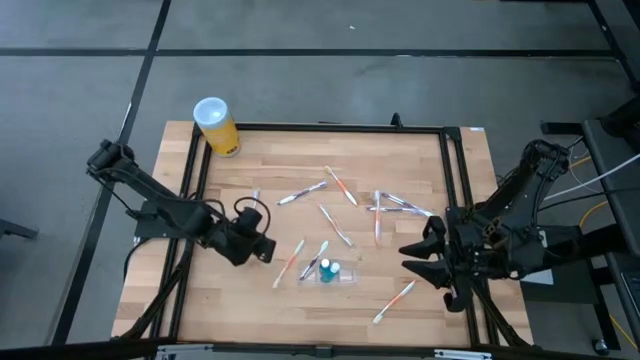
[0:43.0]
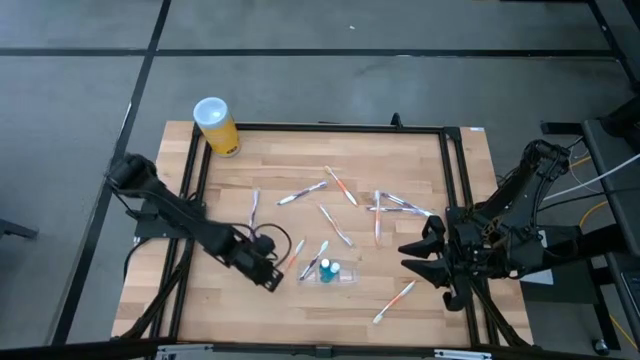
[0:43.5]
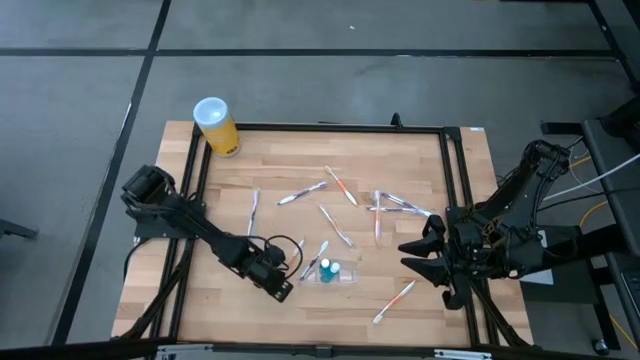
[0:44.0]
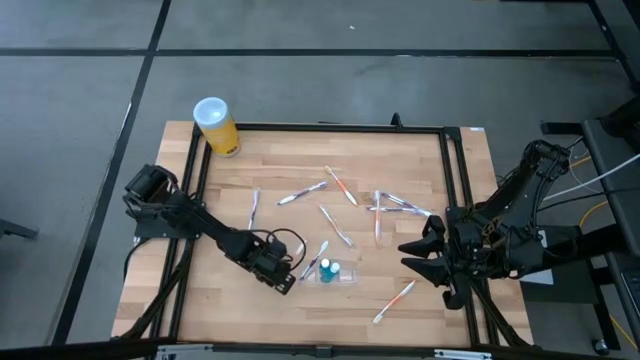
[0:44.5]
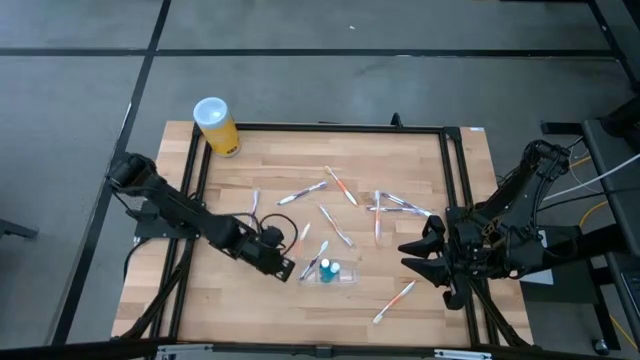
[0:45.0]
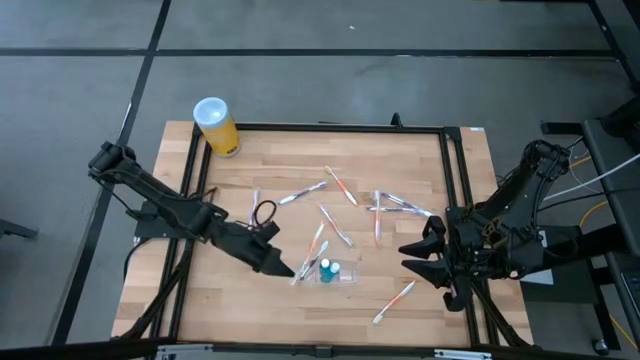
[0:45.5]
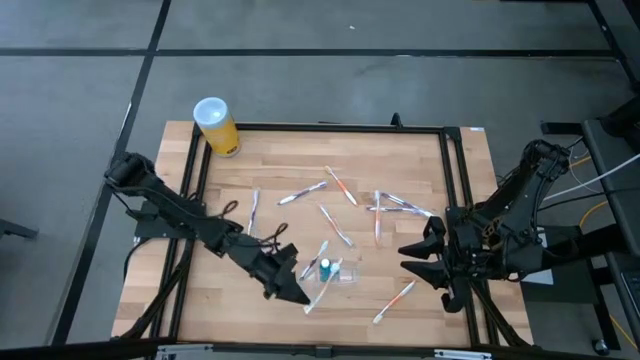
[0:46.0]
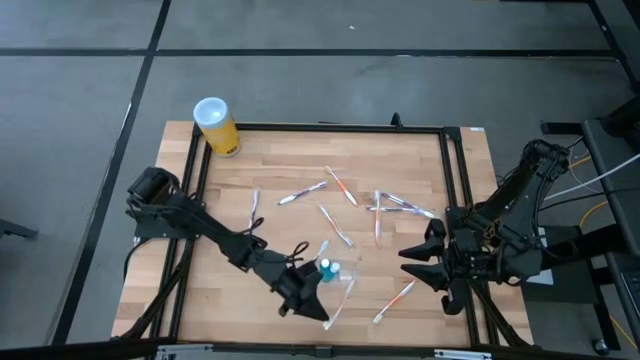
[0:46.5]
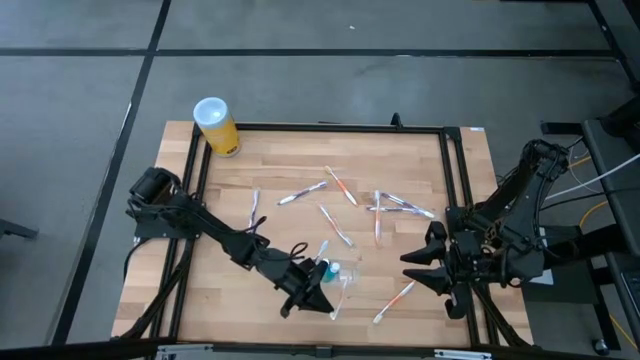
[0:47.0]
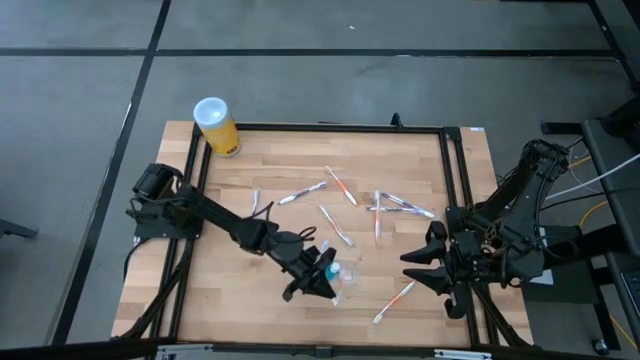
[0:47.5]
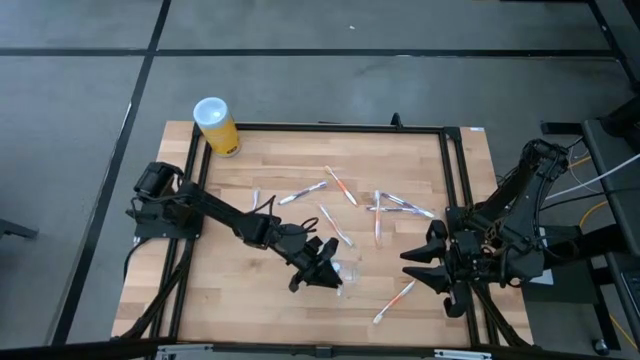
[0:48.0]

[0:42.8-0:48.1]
Task: Pick & Place toothbrushing station
Put the orange toothbrush into the right section of the transparent organizer

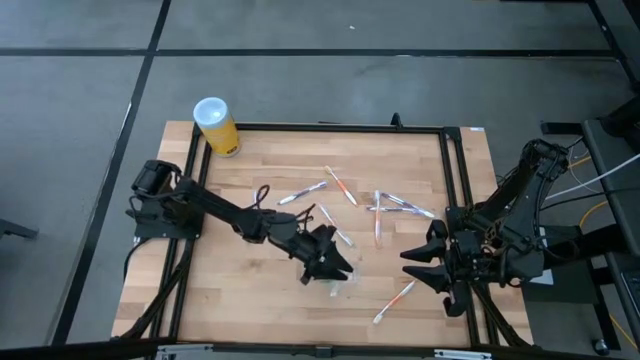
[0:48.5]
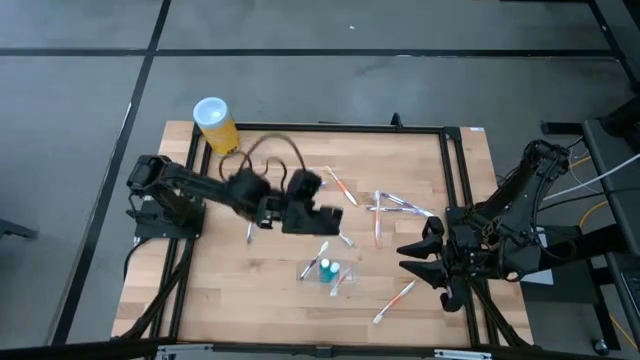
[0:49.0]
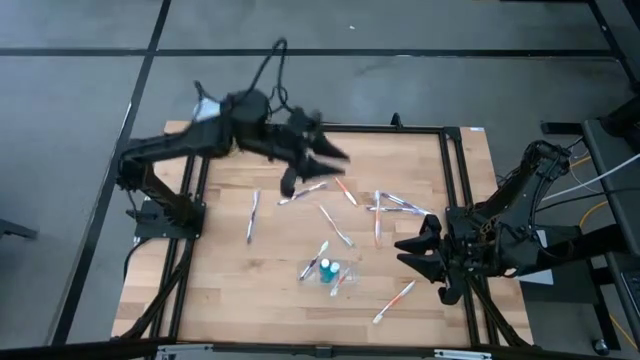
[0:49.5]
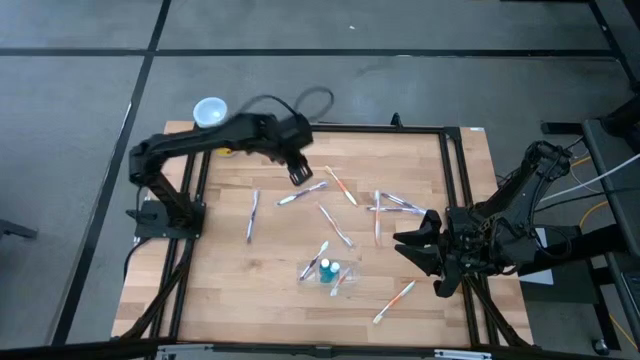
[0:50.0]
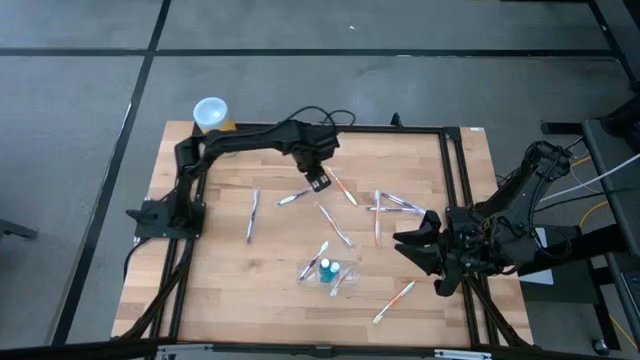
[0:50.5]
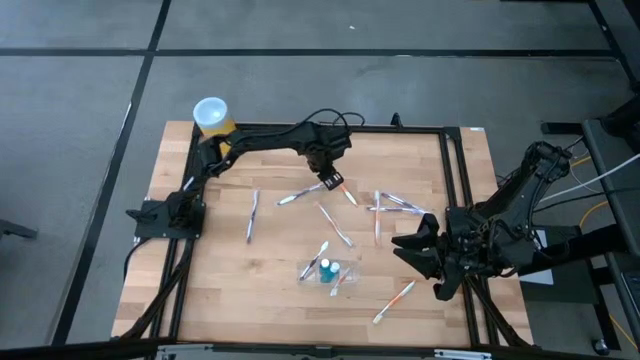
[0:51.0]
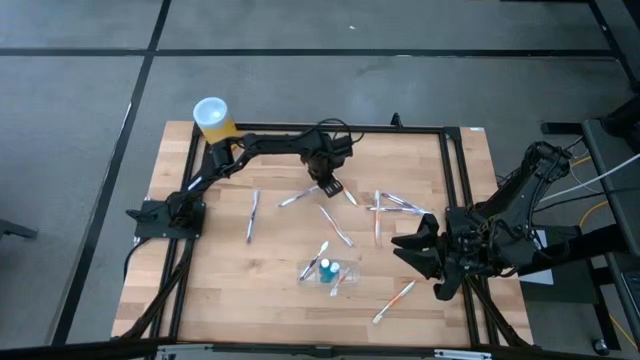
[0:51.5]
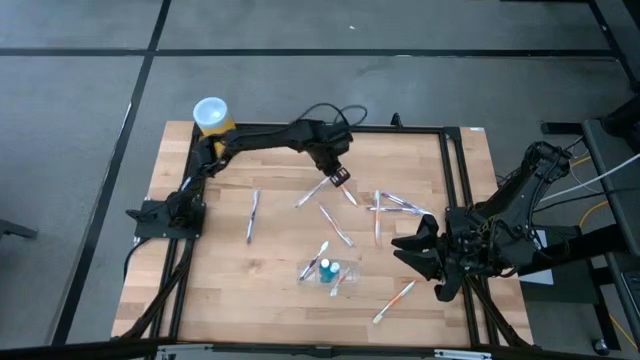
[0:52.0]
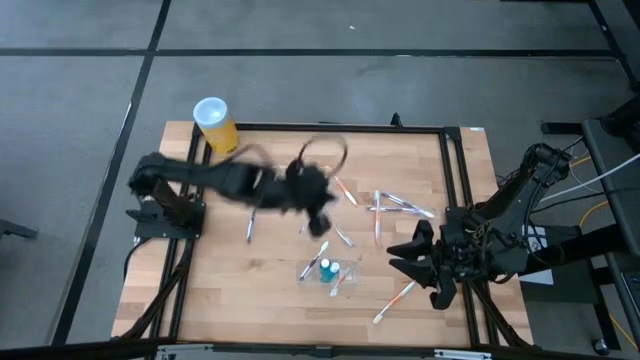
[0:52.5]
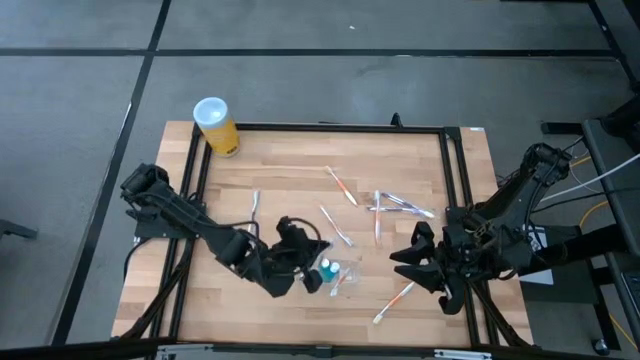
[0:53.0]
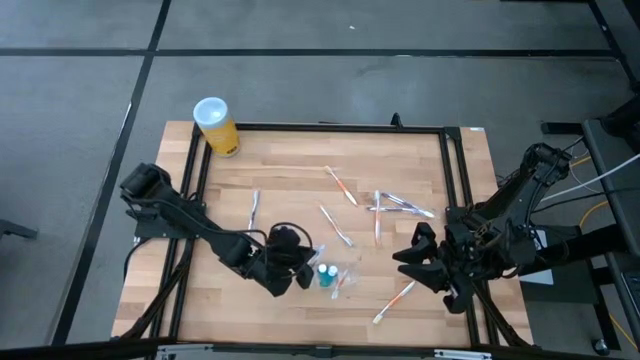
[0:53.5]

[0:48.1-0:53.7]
Put the purple toothbrush into the left section of the transparent organizer

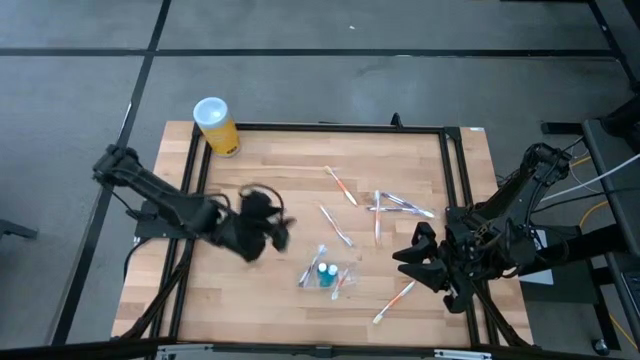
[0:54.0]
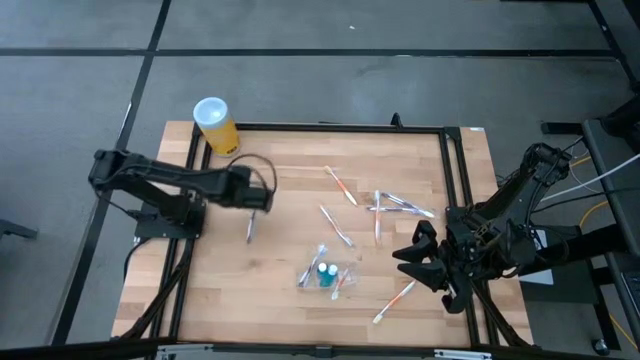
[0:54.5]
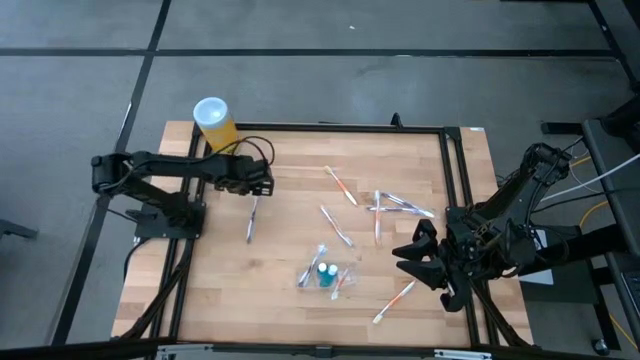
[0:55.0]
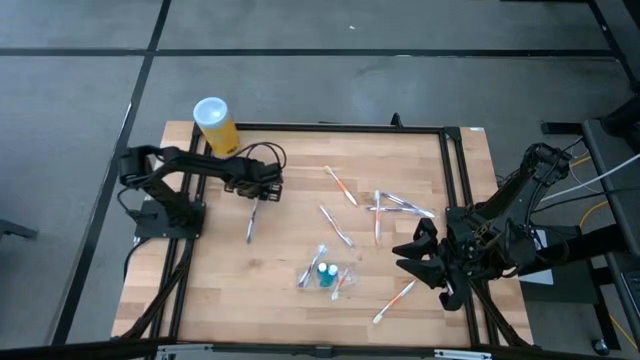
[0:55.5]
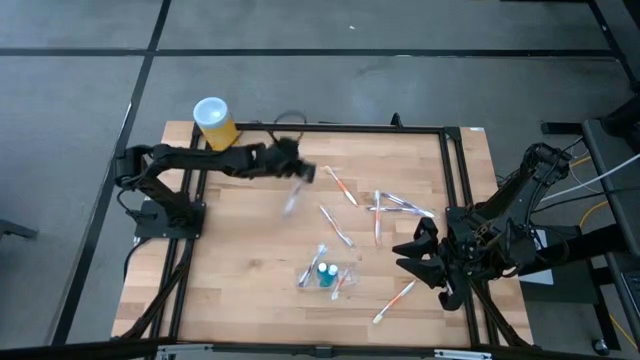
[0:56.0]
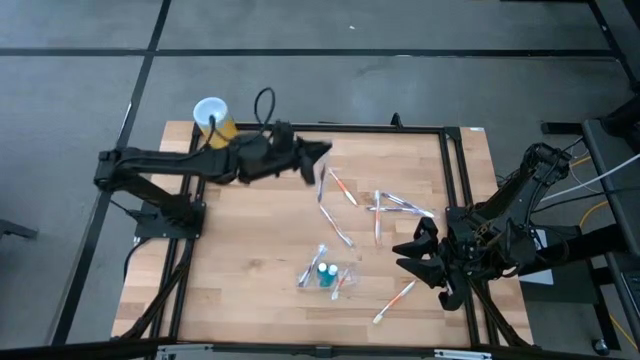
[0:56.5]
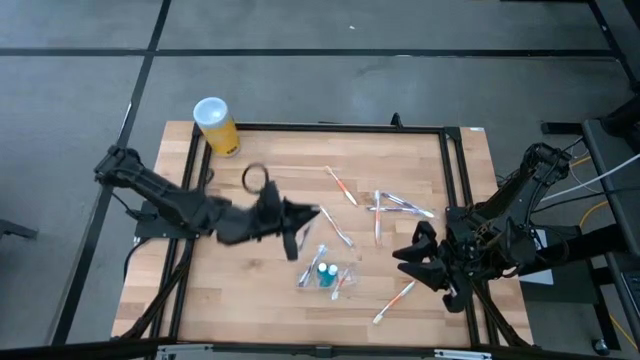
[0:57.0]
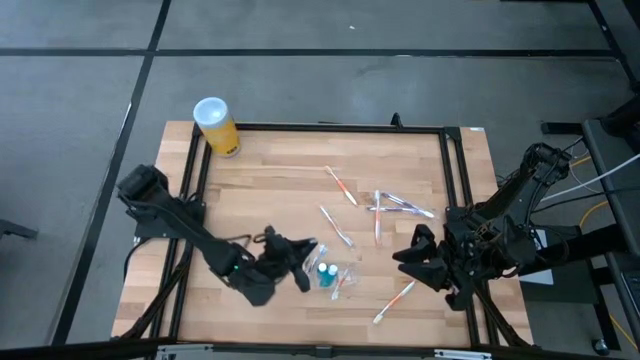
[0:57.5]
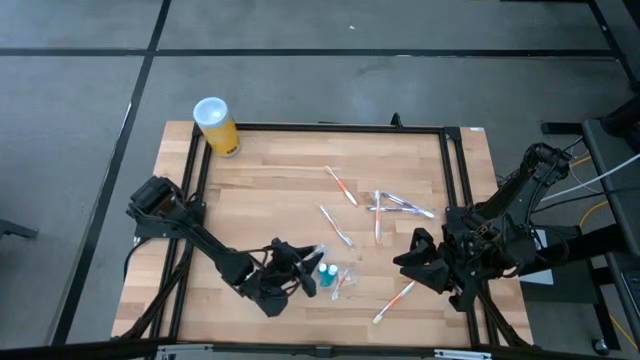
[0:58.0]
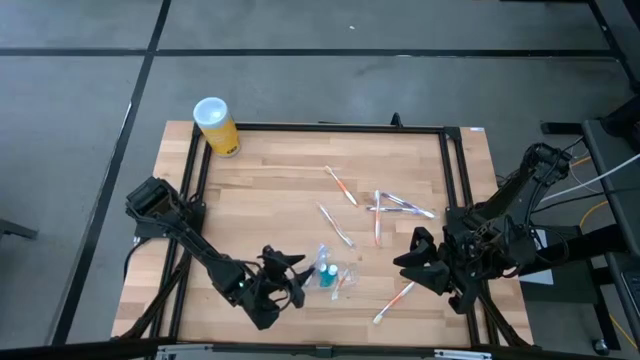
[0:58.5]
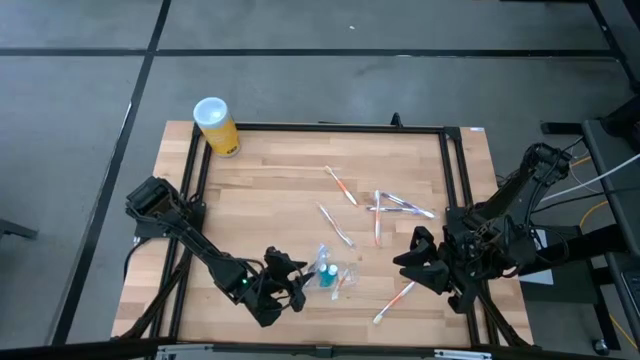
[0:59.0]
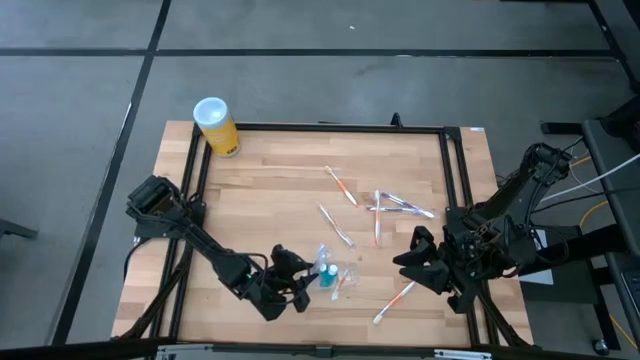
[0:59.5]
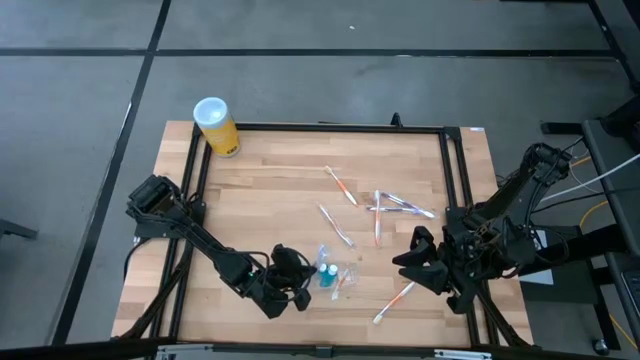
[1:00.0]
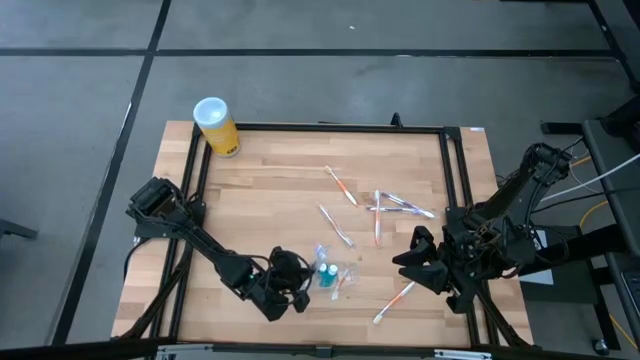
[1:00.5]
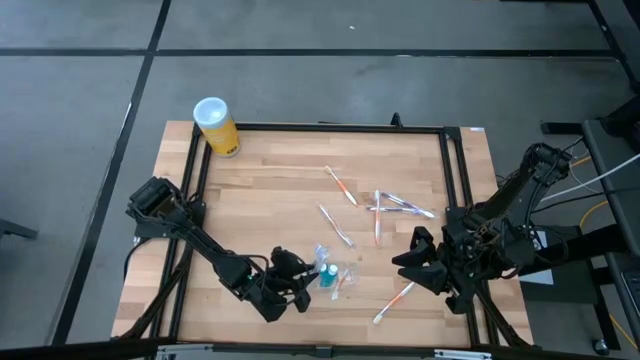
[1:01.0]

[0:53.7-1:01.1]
Put the purple toothbrush into the left section of the transparent organizer

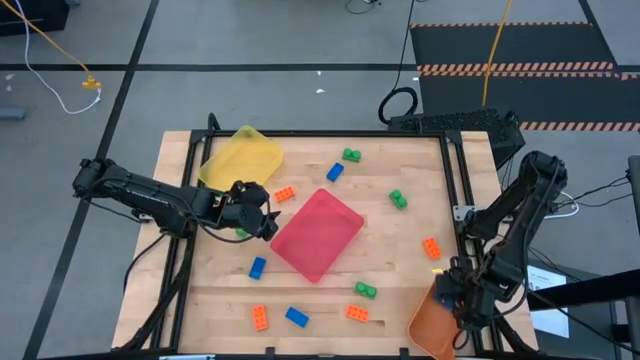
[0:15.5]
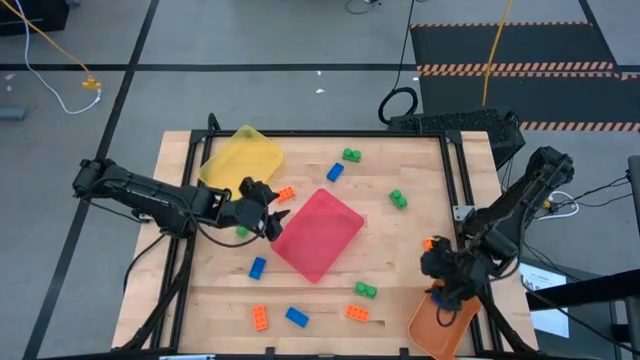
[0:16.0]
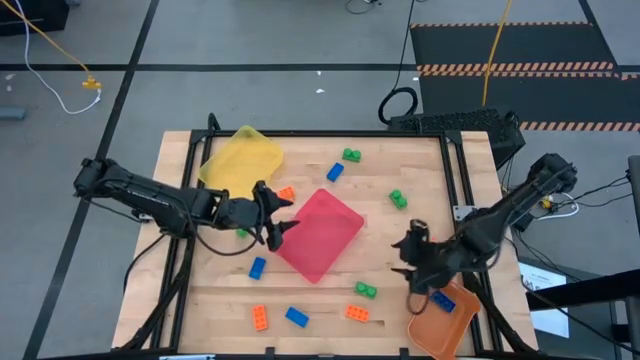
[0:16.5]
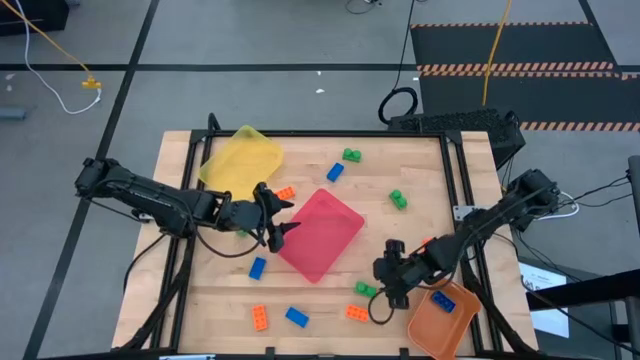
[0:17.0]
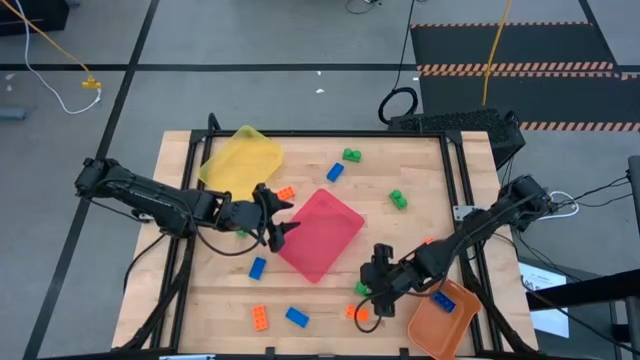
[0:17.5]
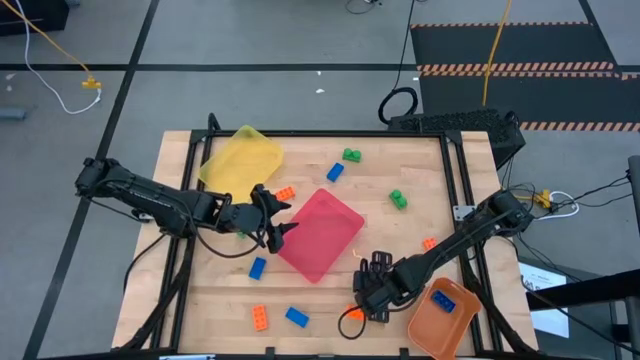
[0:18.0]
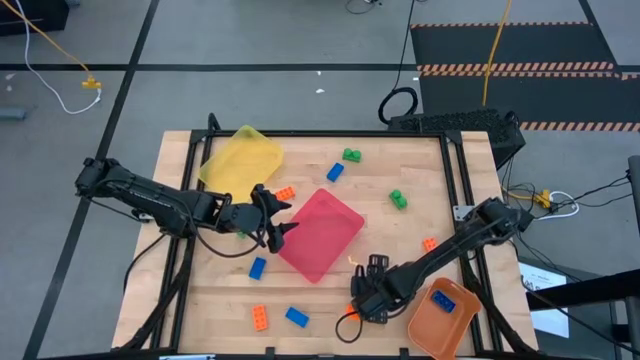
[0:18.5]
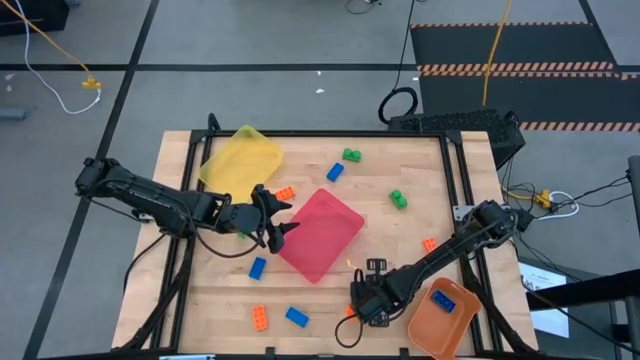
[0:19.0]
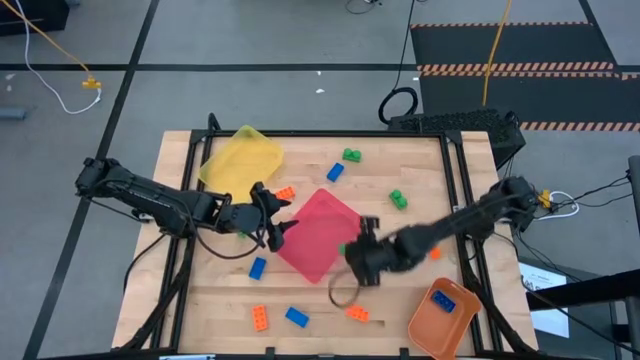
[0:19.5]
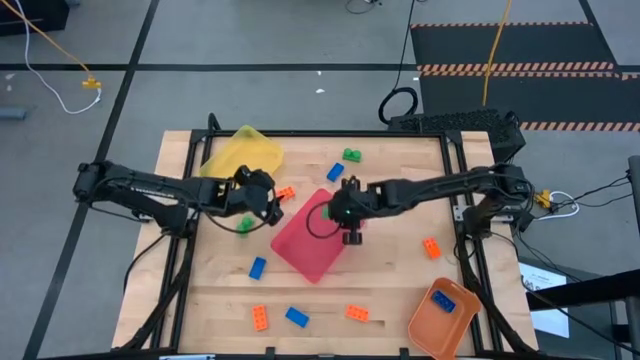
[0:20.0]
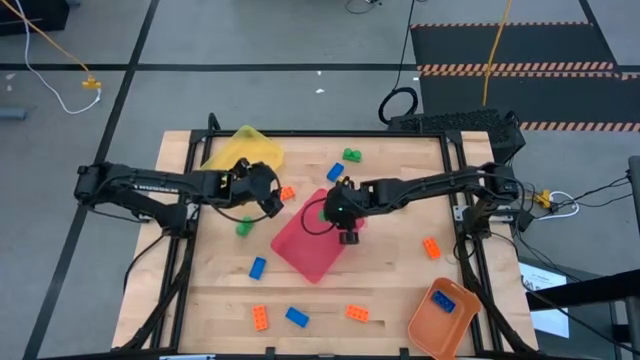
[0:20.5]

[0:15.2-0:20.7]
Task: Sort & place blocks by color
Put the green game piece into the red bin
